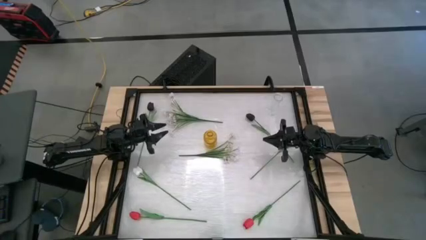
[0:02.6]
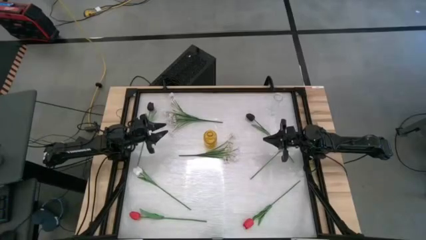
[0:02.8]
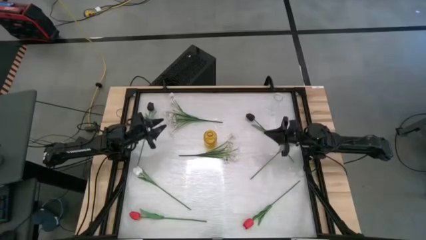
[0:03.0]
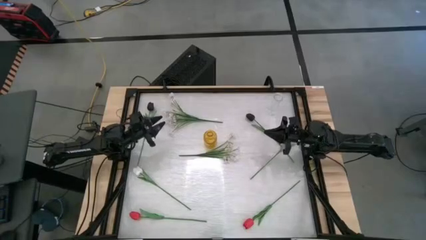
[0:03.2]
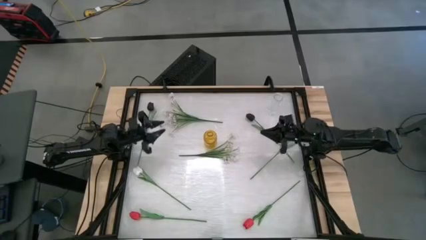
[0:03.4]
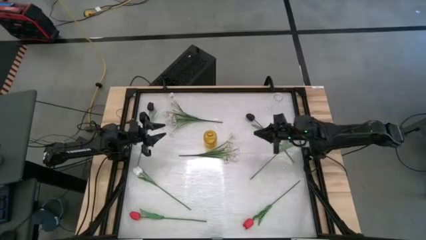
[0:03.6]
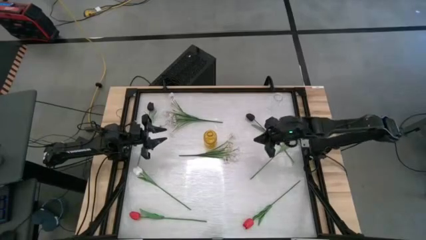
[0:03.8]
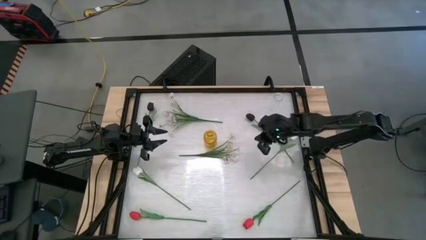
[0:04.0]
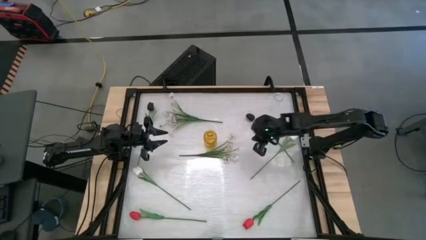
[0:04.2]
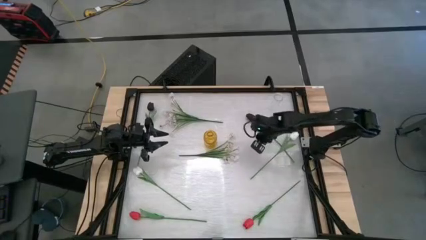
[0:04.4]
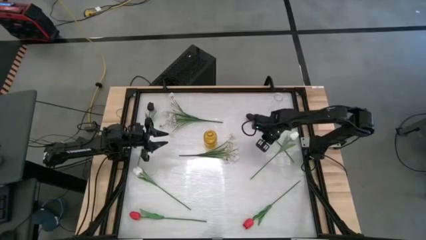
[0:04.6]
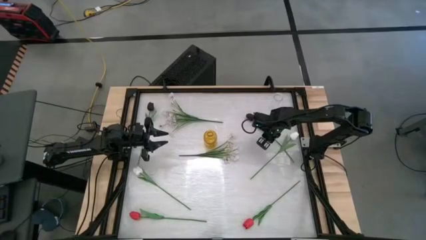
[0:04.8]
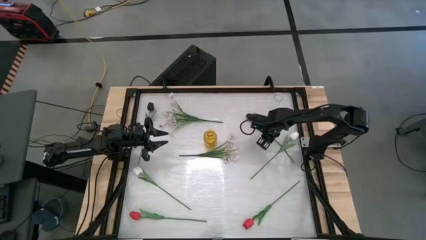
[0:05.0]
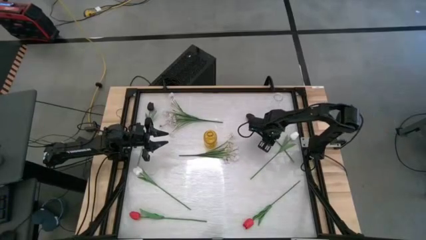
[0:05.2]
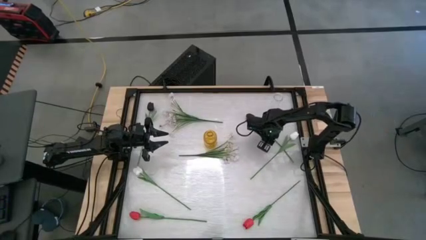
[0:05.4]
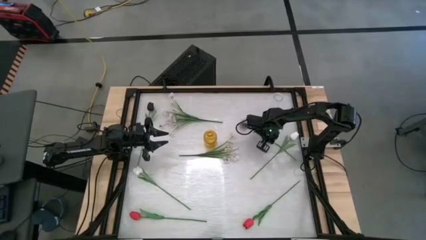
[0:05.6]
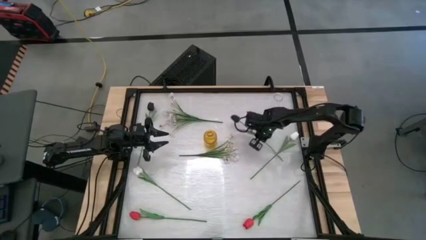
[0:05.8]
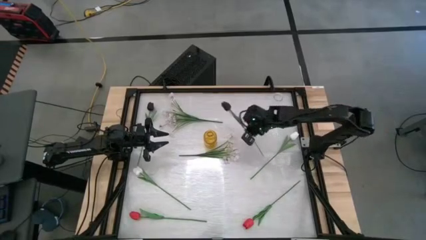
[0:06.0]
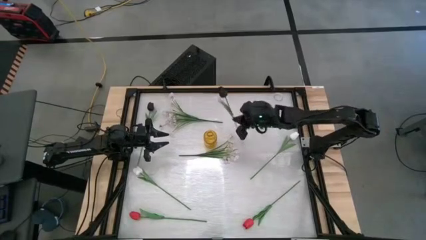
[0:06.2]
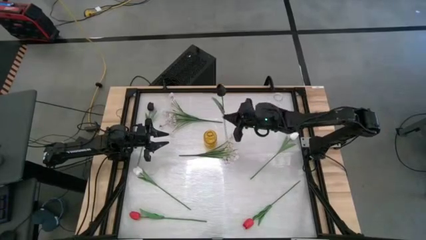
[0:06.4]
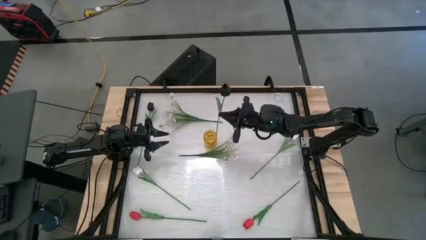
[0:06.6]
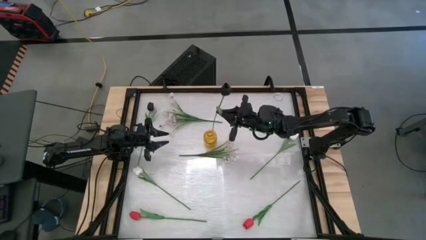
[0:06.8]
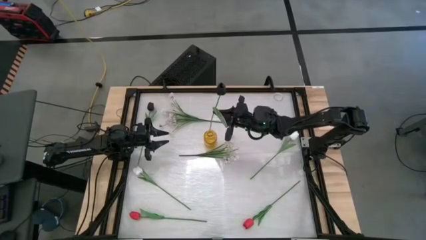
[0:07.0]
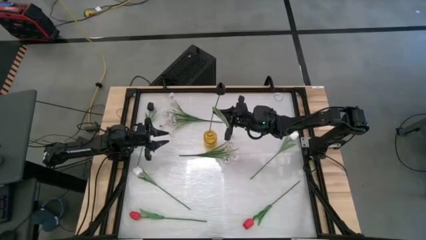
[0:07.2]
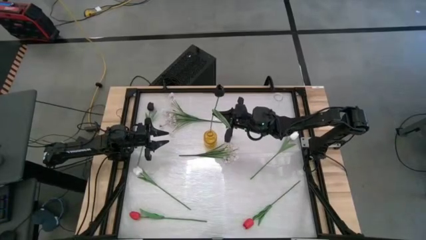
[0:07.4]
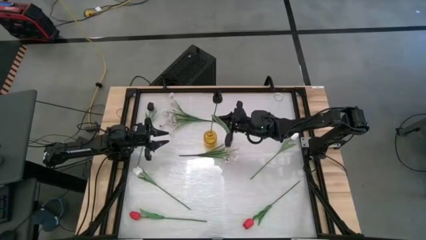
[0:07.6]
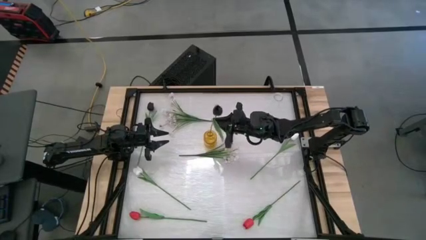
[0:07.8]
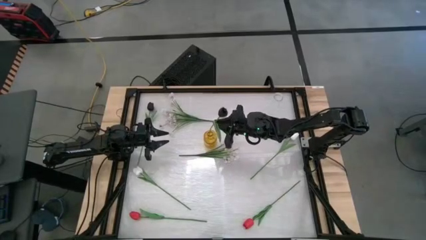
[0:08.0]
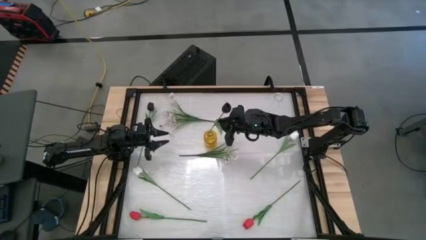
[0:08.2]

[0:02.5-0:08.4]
Task: Sort flowers into vase by color
Put the right black tulip into the yellow flower vase

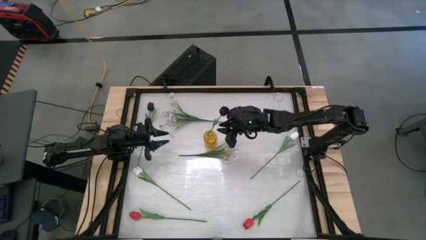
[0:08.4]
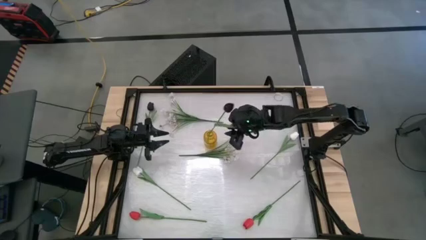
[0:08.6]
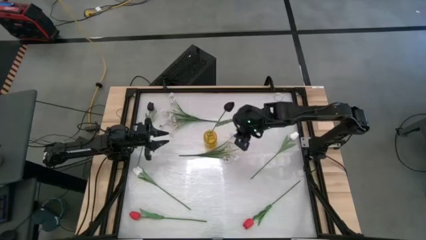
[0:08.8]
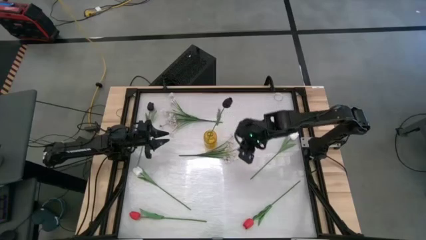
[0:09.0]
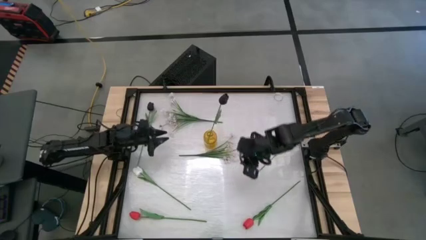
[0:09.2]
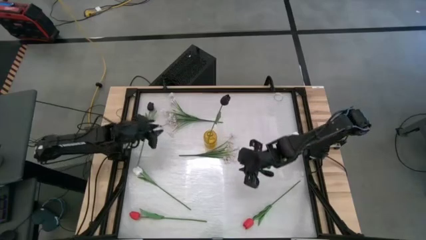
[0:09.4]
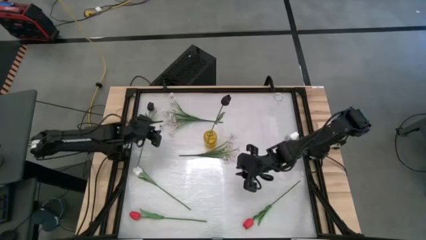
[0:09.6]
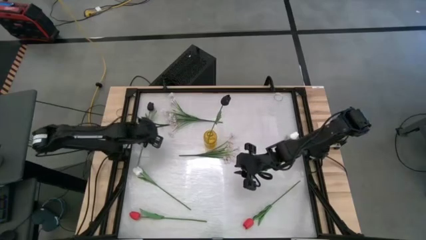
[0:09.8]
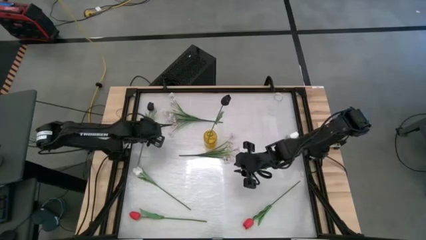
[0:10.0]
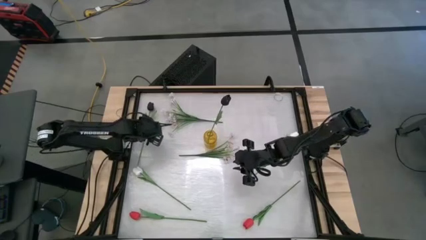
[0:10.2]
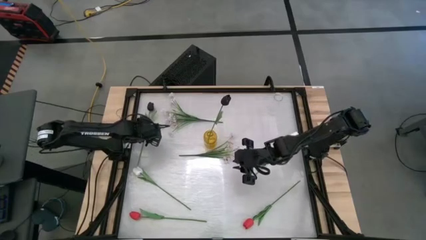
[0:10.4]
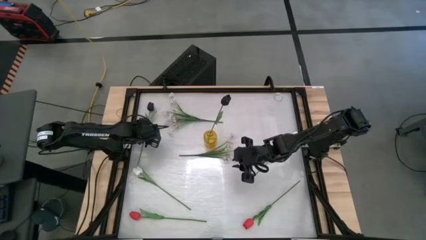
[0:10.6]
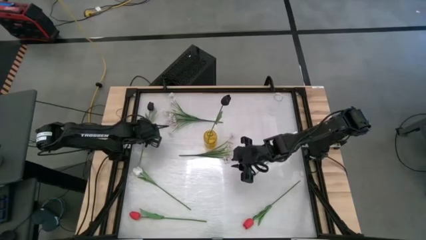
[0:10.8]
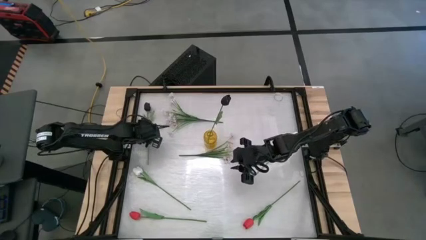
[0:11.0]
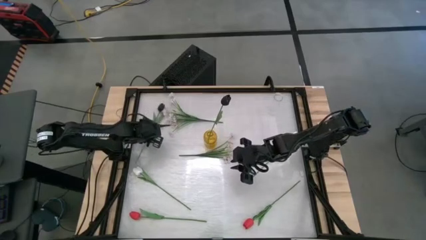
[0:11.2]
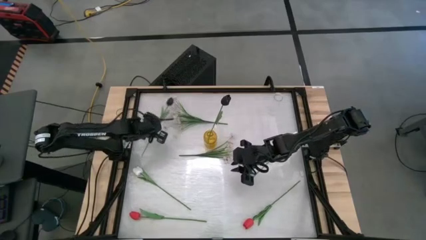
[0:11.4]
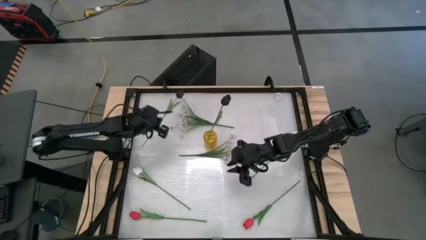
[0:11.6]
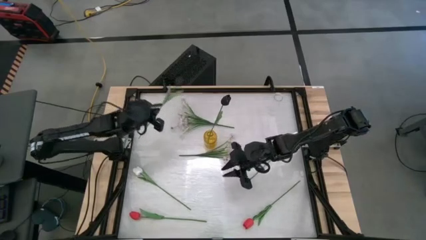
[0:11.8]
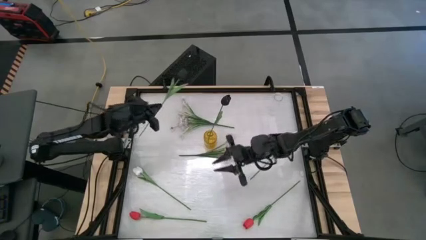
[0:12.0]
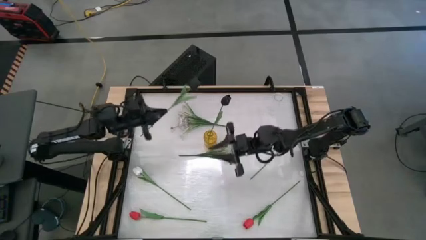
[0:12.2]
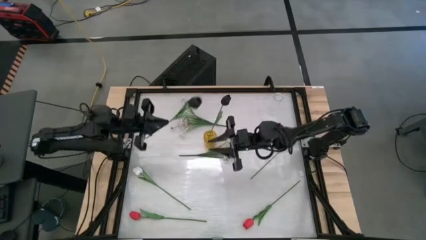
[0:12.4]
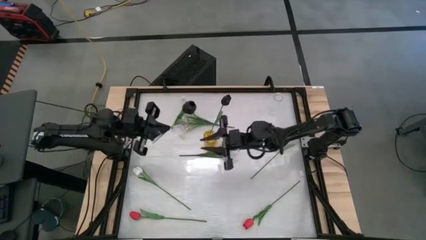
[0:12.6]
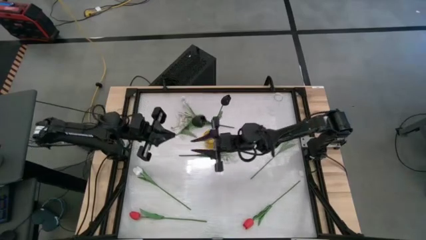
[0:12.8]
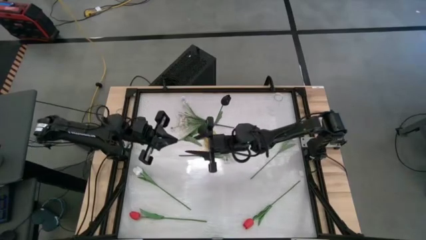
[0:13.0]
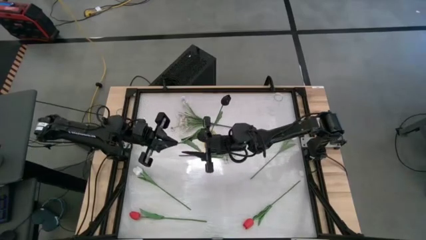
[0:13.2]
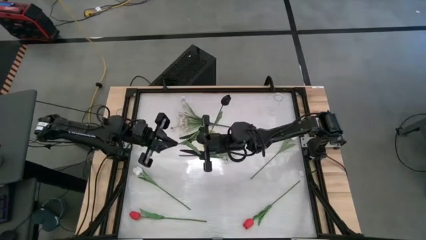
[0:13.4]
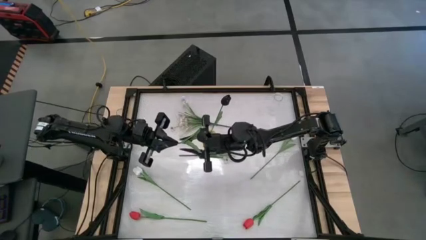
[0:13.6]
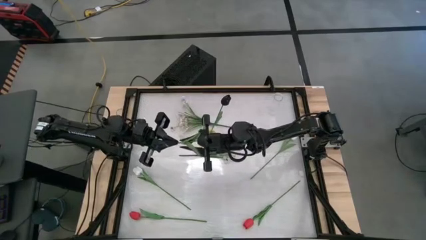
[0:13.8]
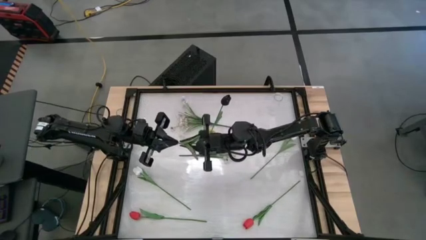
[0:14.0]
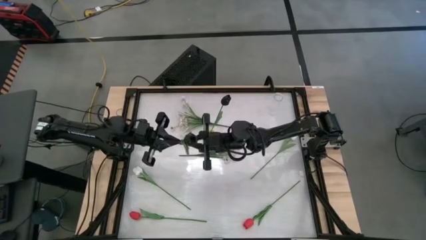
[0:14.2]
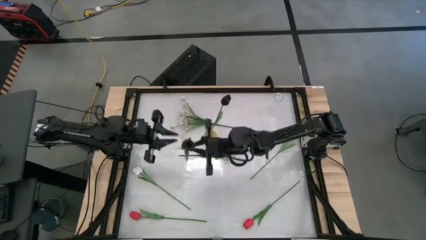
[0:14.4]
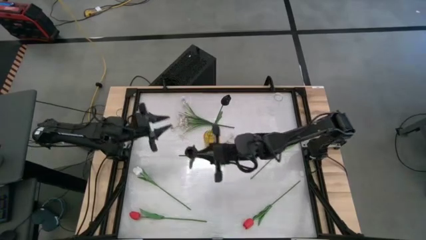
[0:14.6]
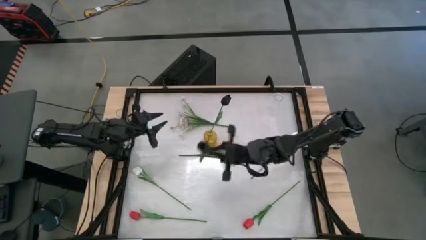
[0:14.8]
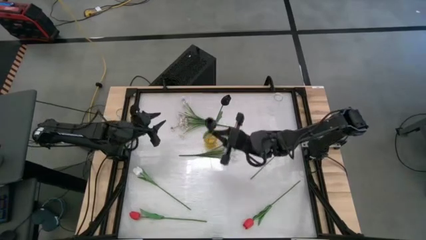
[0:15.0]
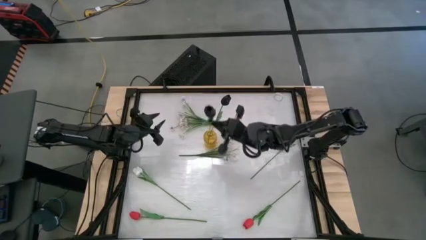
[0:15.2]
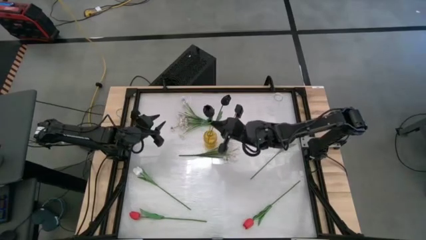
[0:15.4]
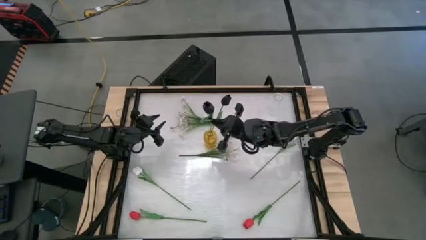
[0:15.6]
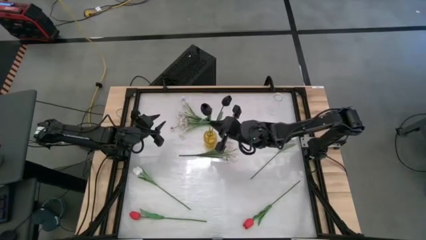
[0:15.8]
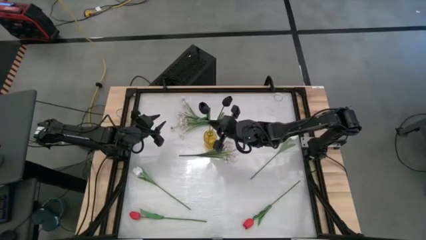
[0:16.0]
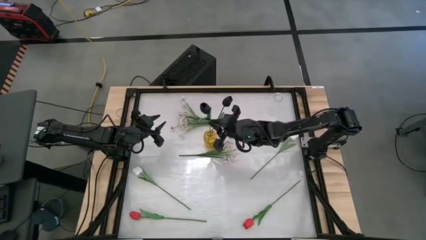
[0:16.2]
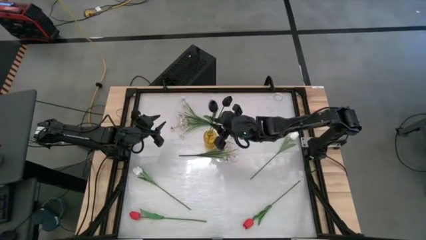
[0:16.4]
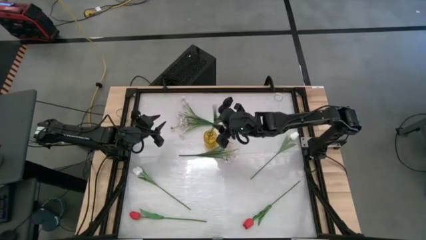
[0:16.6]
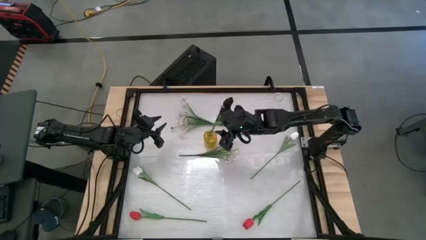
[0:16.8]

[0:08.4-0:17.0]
Put the black tulip into the yellow flower vase

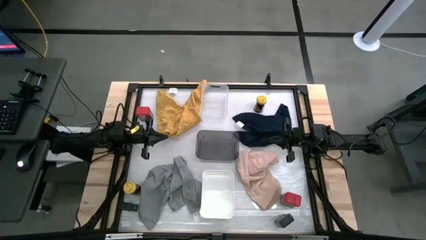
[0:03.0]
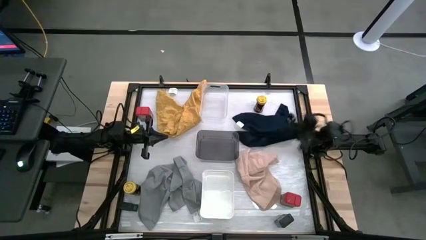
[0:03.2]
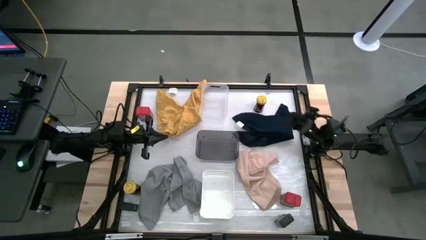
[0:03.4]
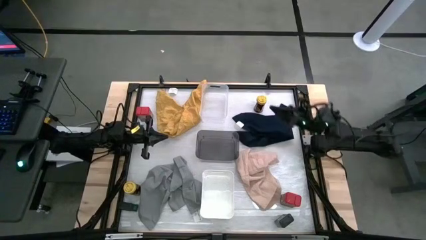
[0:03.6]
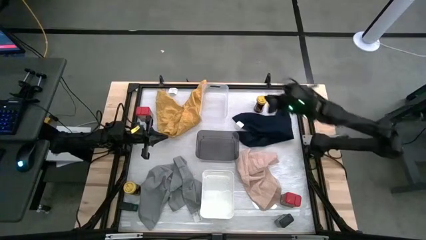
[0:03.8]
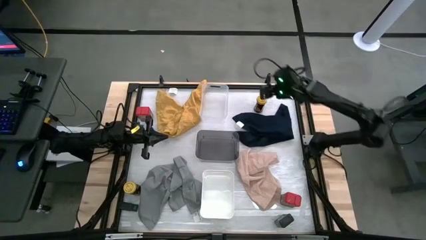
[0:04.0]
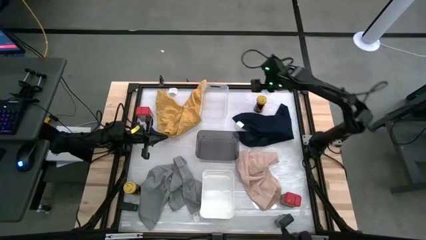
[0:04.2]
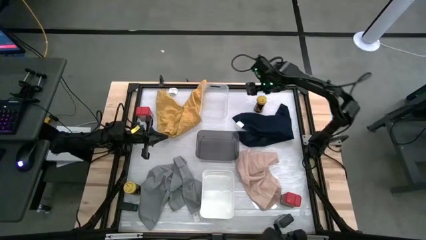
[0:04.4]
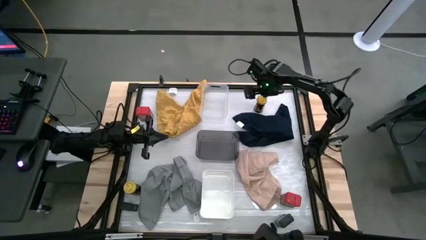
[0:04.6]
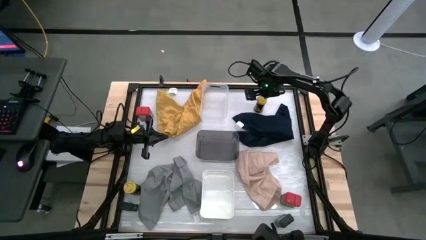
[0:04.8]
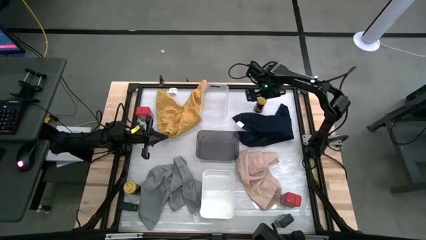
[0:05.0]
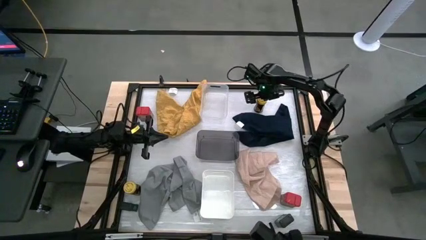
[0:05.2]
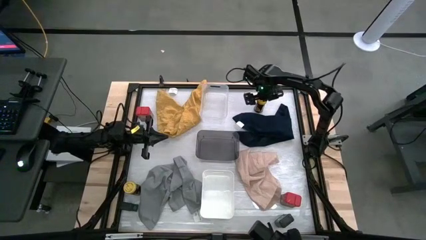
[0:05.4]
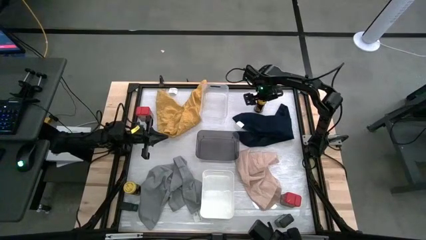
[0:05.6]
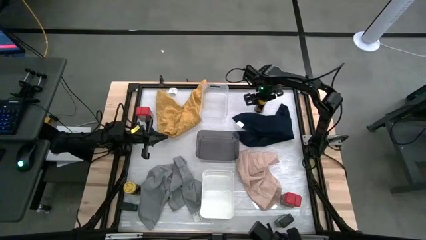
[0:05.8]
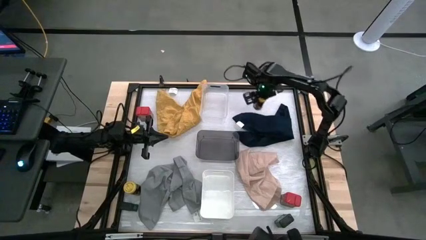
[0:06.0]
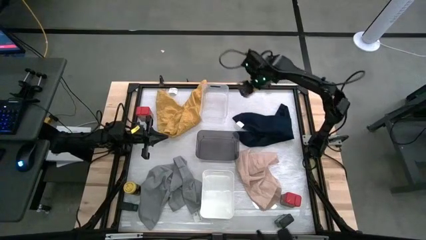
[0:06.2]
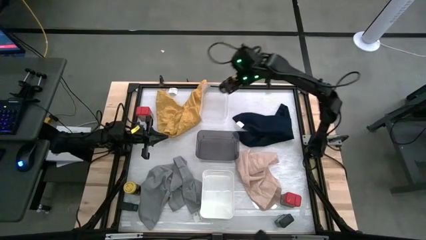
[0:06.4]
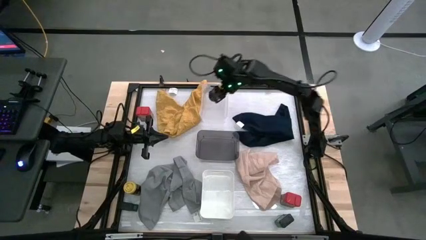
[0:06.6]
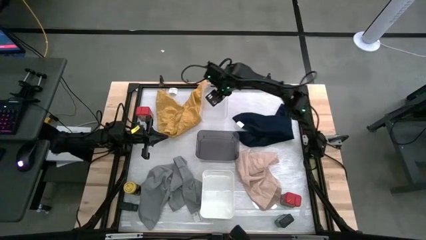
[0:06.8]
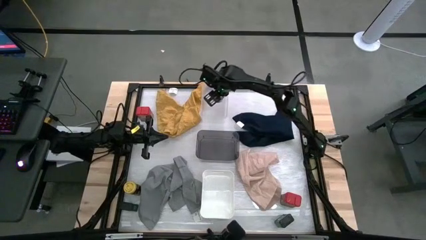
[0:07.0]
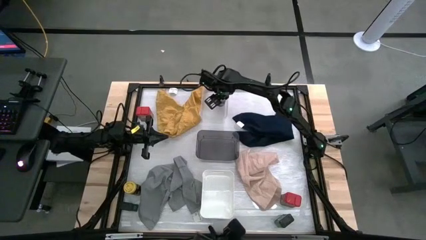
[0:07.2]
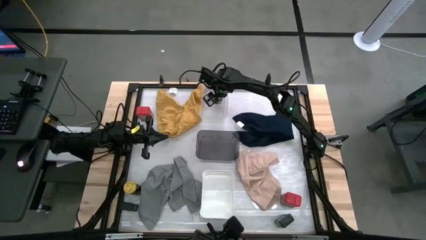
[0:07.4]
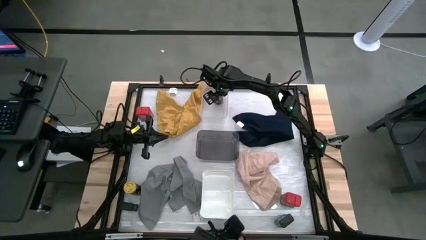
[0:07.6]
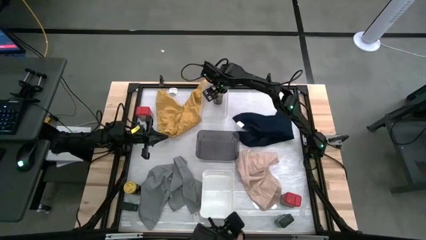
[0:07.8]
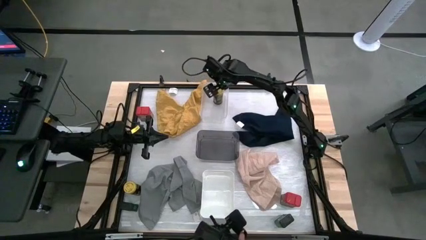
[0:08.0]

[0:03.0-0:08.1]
Task: Sort spices by type
Put the top yellow spice bottle into the transparent bin
